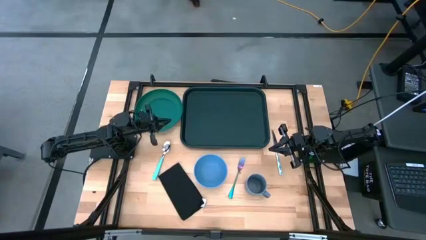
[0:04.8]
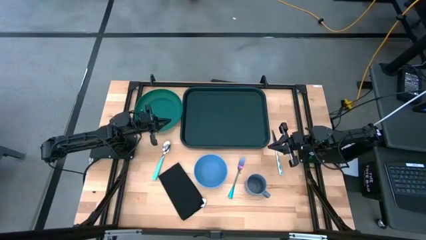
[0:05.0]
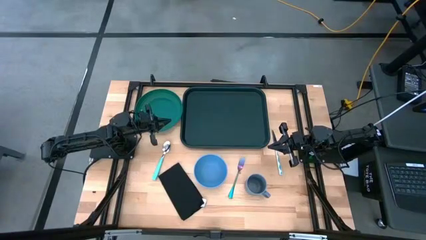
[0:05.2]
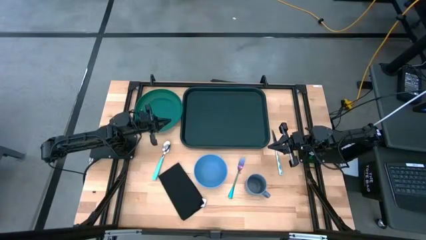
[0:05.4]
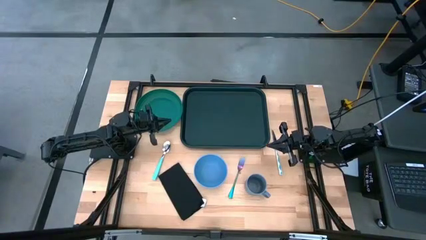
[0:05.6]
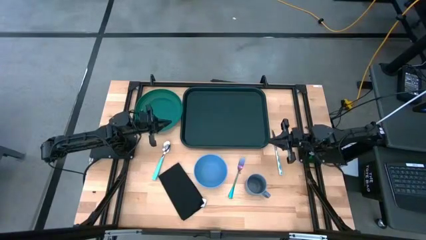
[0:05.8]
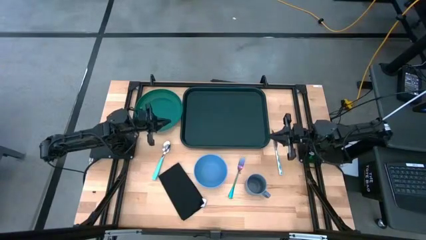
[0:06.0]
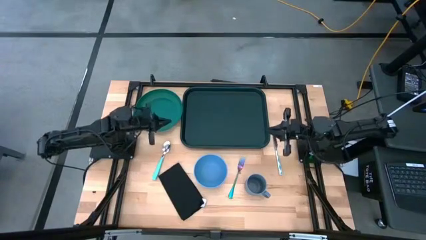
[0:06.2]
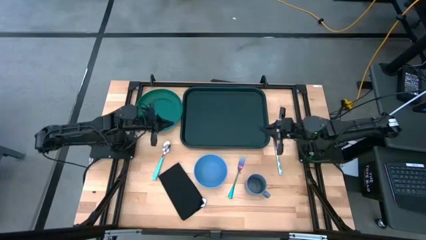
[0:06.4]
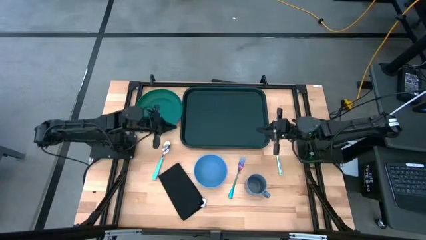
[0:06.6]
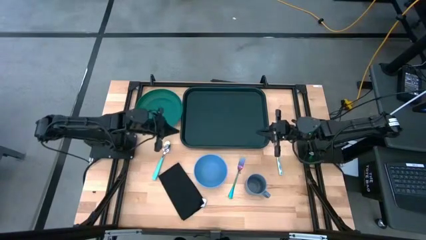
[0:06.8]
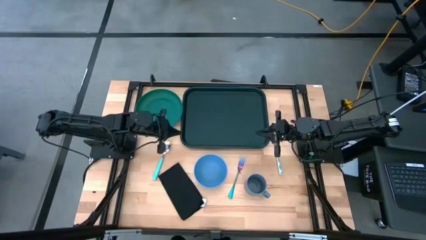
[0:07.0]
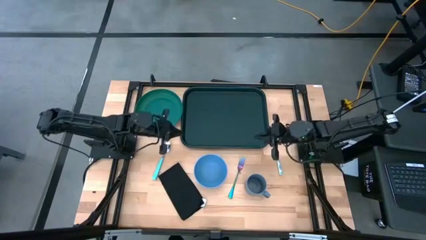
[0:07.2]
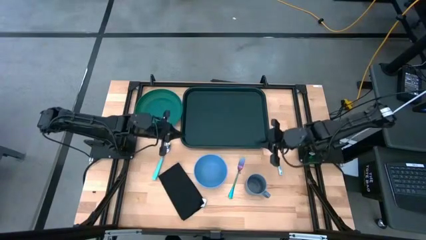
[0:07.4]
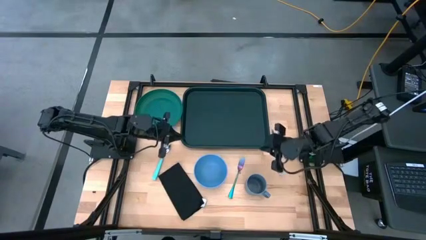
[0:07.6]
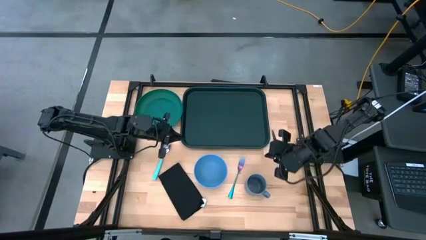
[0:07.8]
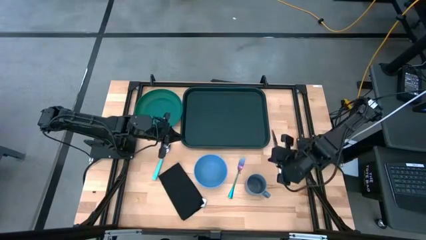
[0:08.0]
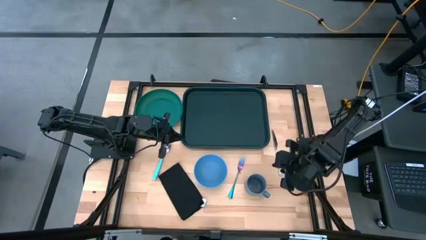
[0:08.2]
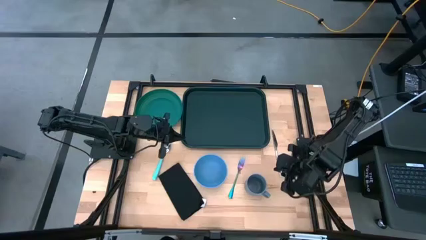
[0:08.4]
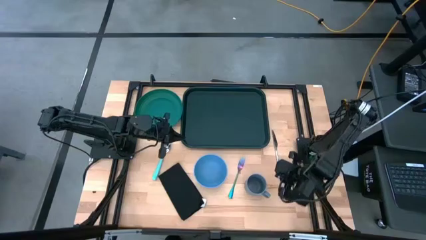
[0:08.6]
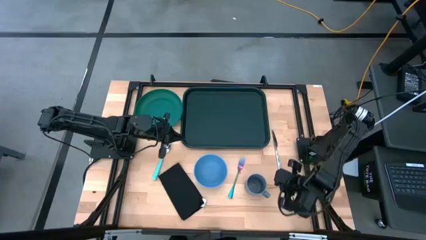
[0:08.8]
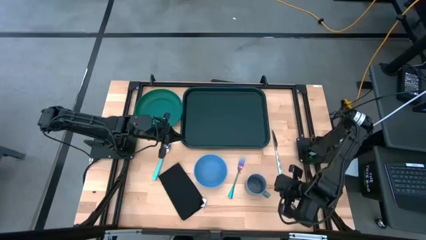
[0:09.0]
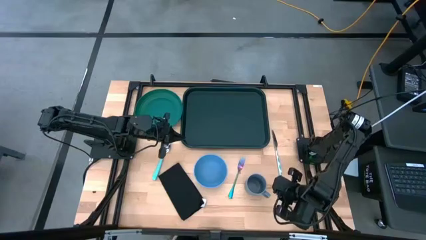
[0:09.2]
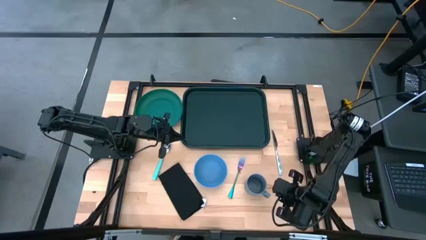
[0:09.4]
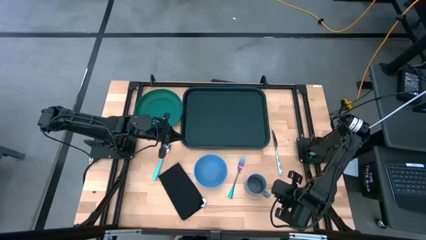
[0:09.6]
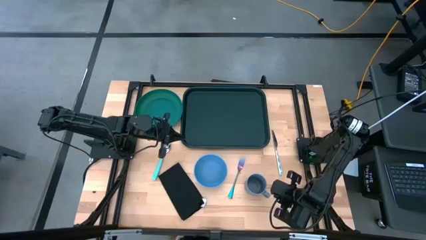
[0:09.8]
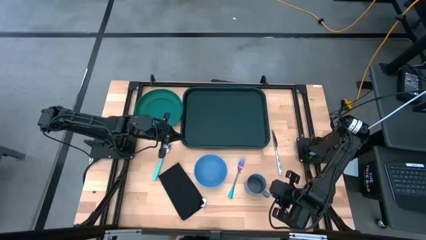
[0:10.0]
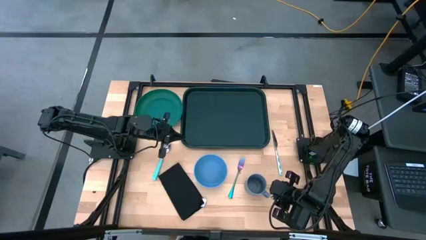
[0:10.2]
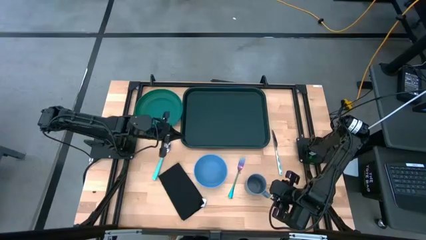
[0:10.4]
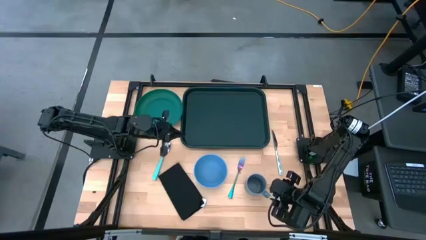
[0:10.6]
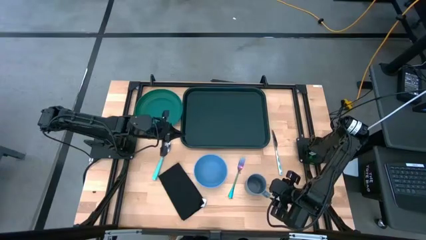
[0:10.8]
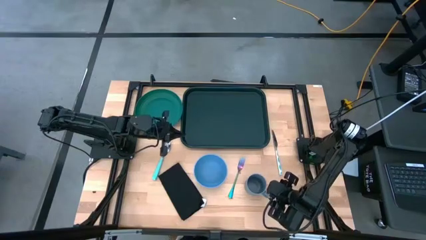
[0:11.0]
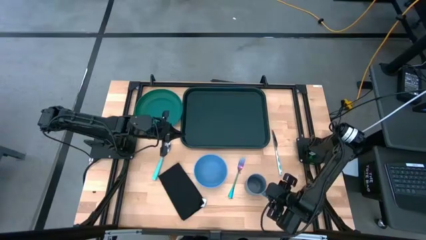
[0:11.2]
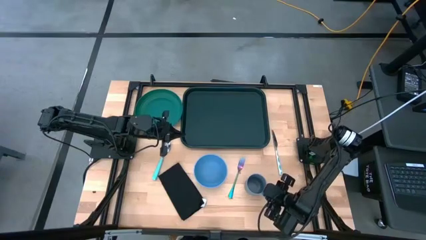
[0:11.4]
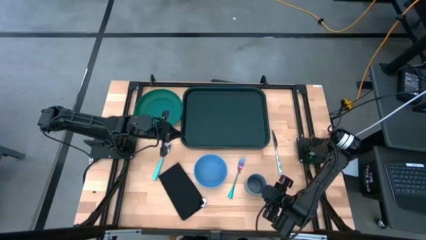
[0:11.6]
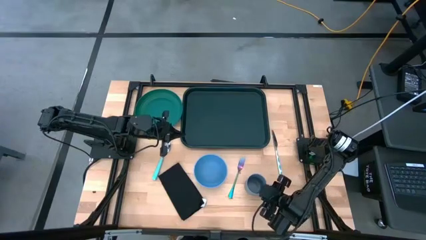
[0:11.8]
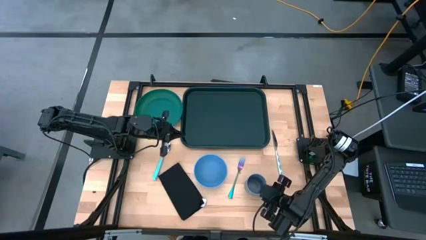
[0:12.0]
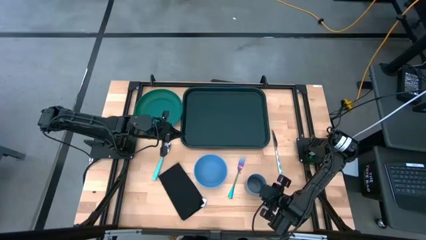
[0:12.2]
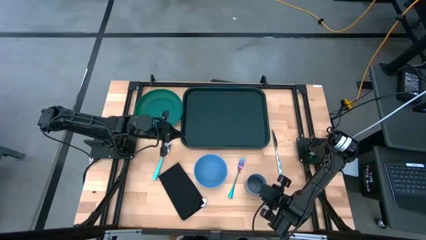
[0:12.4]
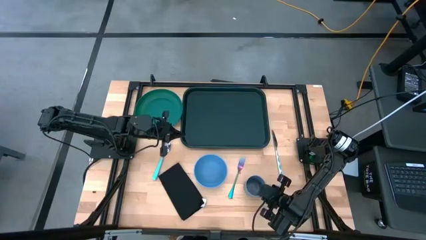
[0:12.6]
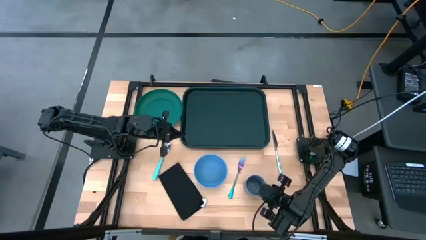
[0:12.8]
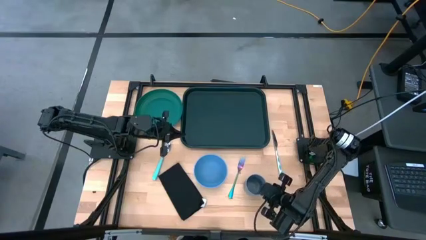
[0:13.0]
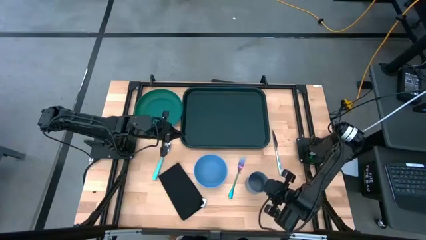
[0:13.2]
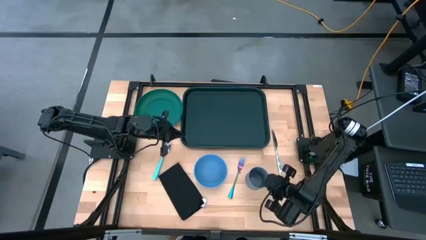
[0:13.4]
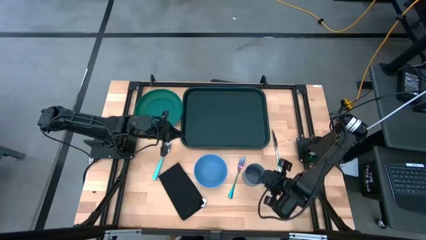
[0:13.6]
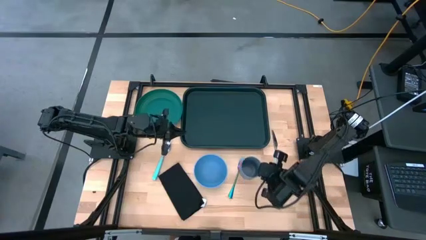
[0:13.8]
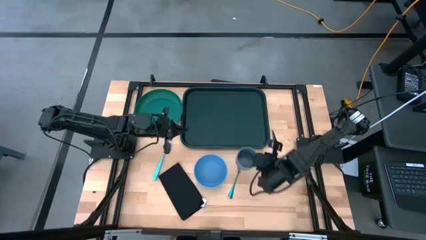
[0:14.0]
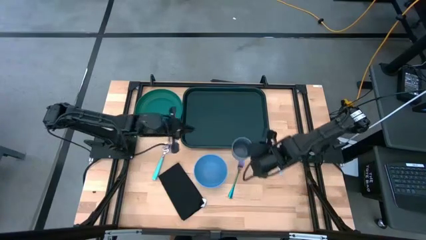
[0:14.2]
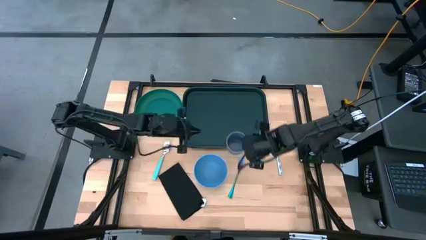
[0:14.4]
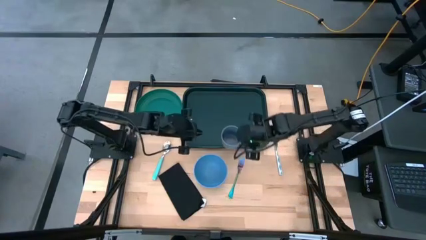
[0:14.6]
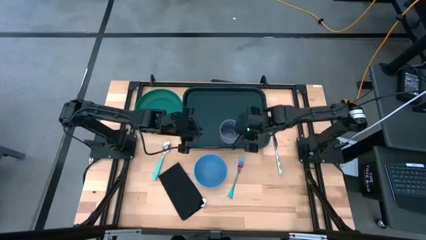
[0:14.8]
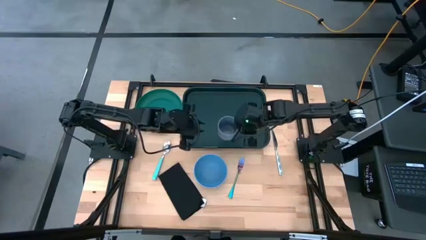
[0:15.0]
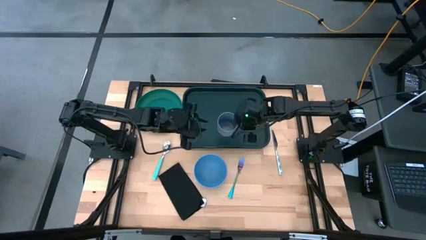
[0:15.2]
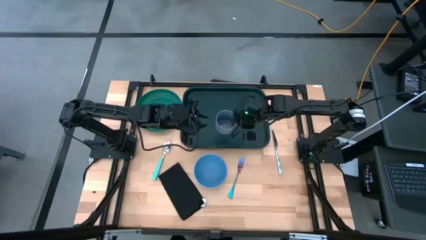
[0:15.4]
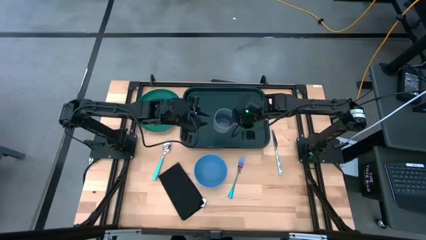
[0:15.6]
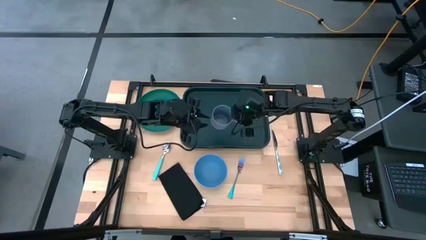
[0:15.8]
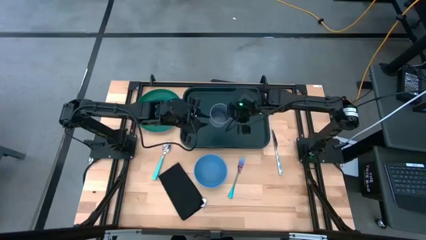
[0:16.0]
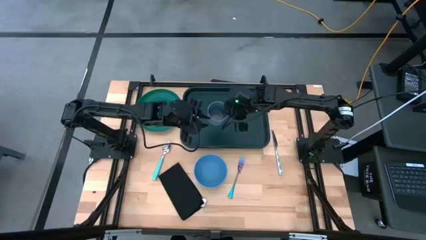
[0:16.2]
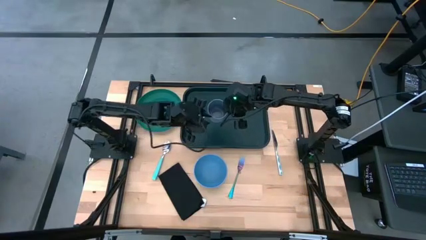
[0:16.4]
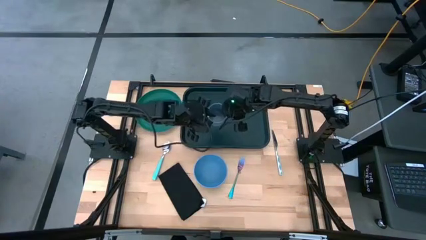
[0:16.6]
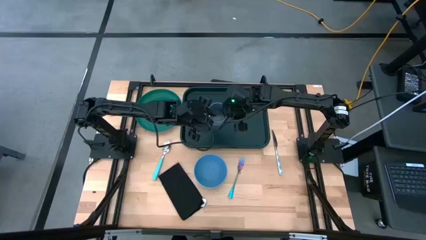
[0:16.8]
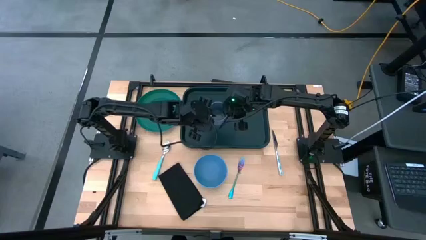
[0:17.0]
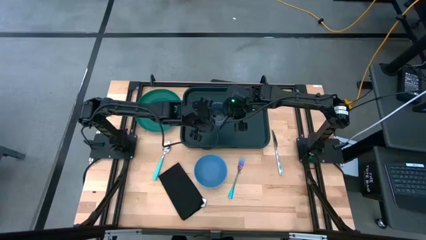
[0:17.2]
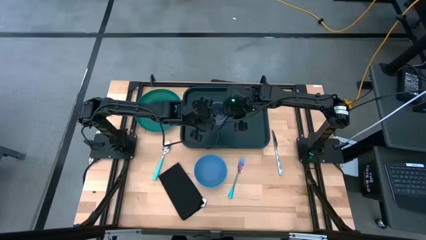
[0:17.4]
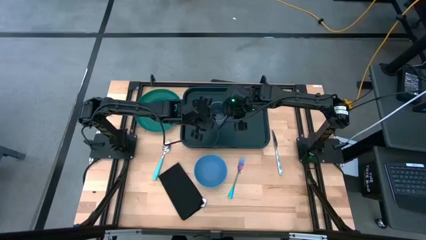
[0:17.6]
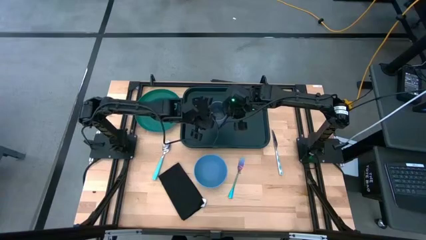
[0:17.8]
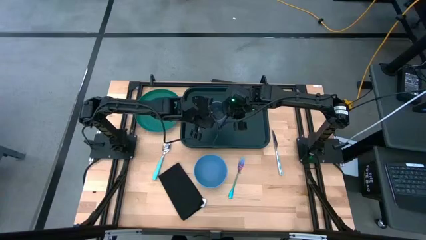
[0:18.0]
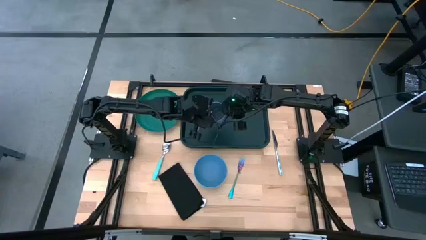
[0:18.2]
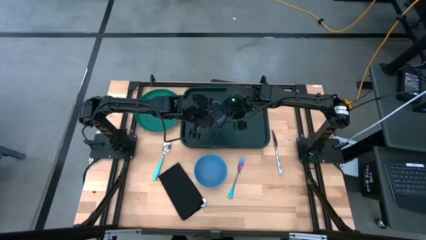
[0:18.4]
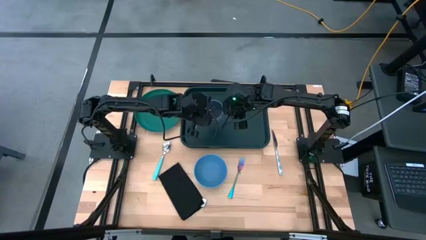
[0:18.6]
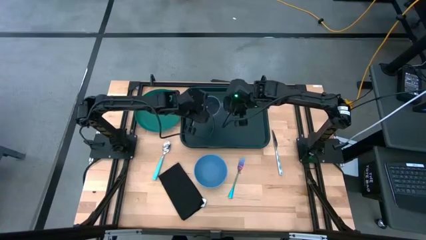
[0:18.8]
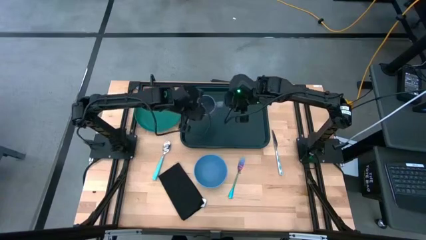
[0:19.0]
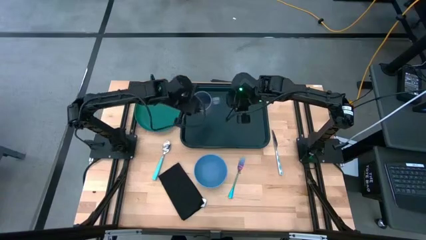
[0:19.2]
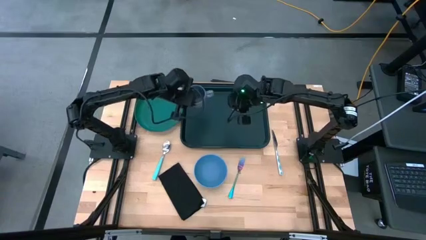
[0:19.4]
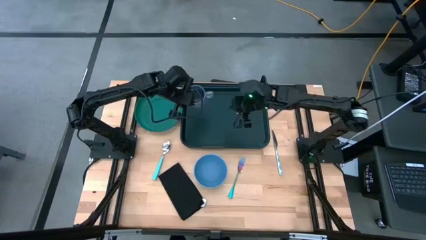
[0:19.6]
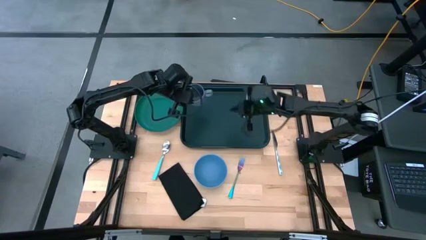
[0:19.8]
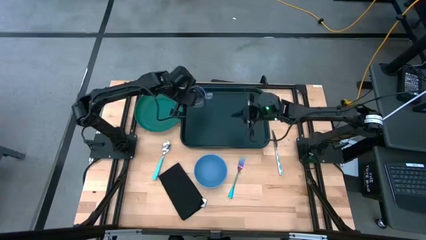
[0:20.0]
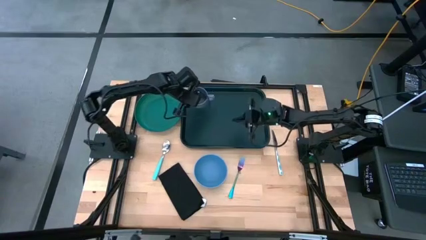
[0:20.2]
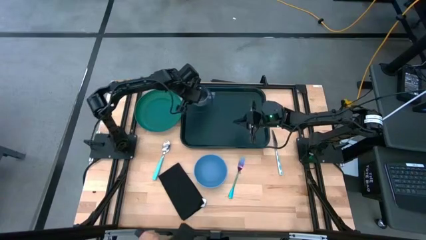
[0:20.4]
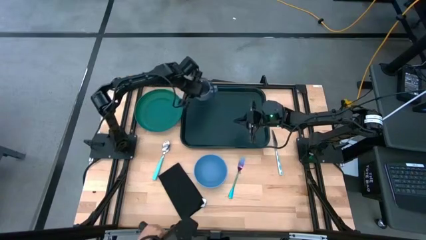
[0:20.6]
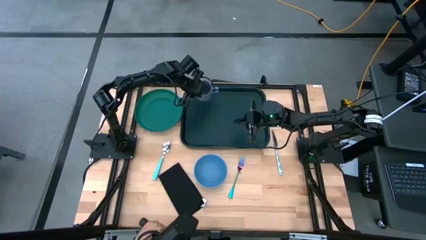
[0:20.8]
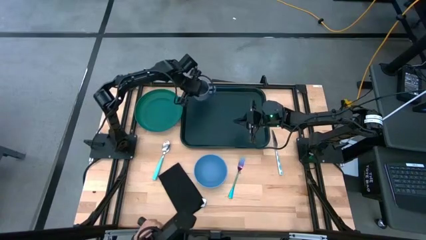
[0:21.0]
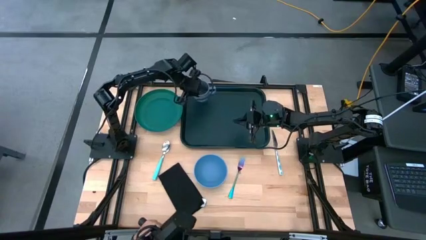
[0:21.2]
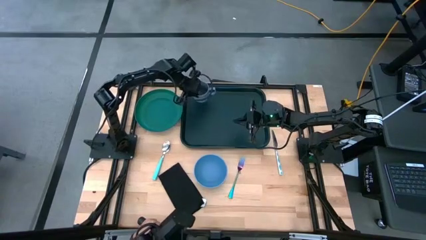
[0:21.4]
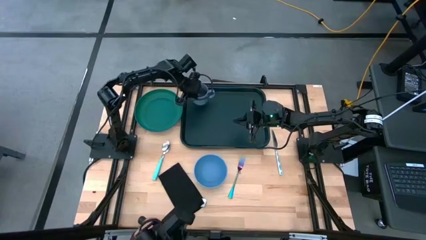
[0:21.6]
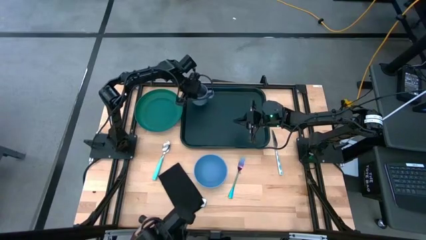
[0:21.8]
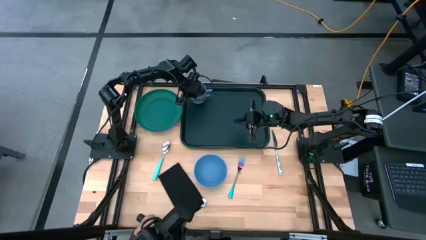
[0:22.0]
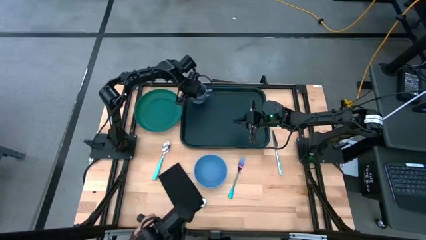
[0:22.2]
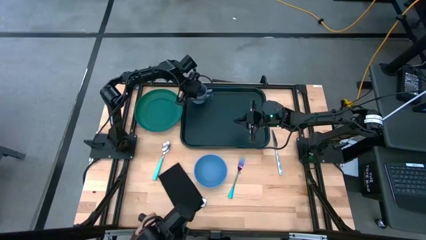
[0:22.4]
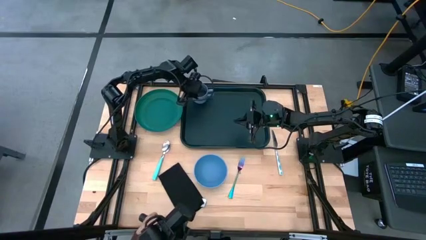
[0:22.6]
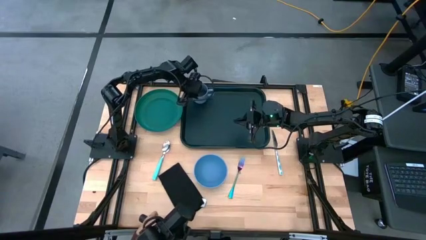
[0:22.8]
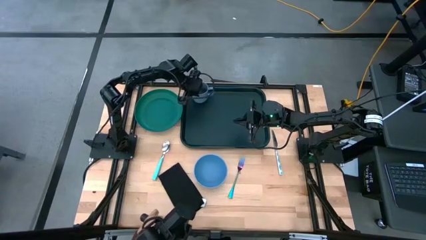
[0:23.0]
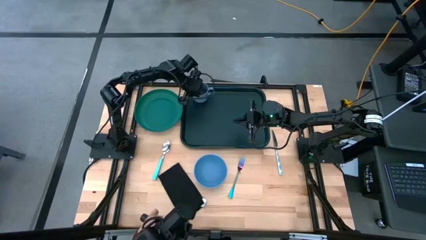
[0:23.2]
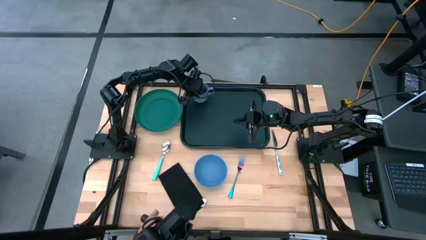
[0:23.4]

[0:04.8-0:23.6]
Task: Set up tray
Put the gray mug on the dark green tray
